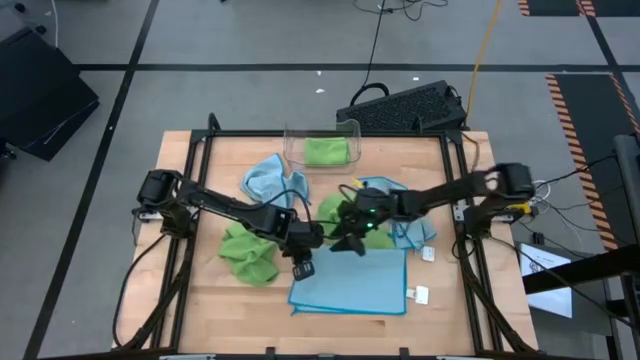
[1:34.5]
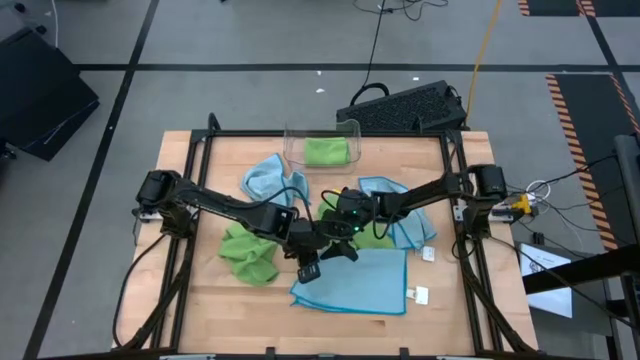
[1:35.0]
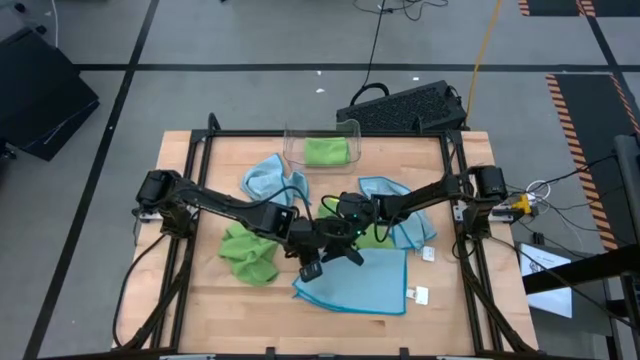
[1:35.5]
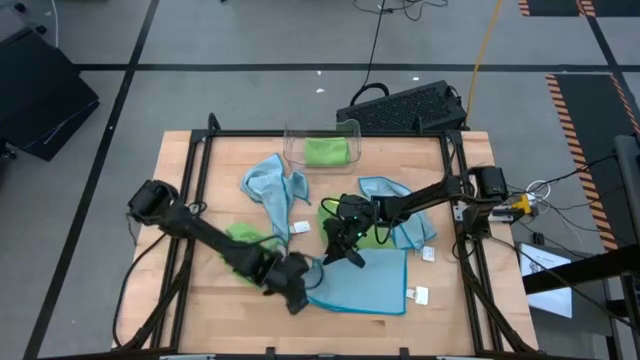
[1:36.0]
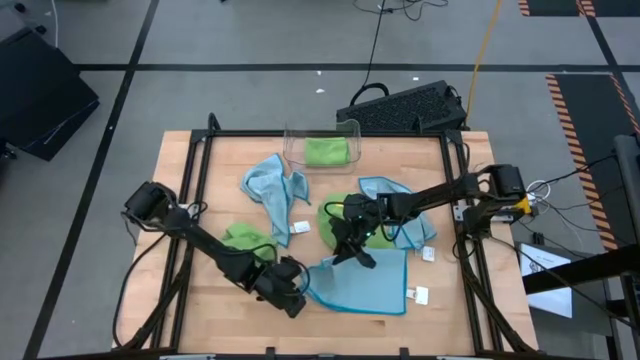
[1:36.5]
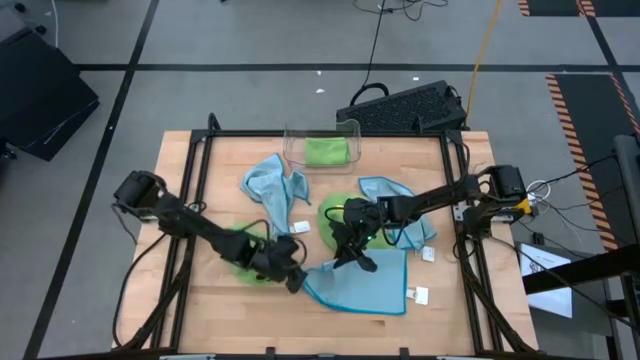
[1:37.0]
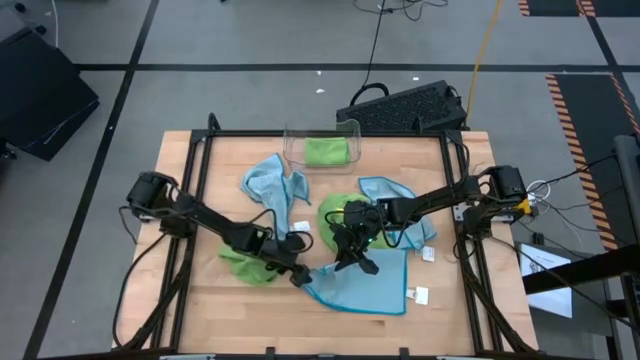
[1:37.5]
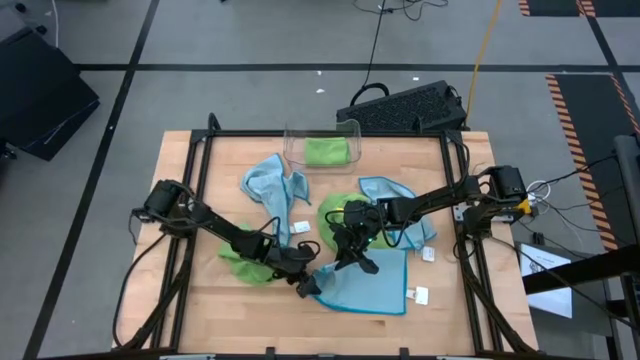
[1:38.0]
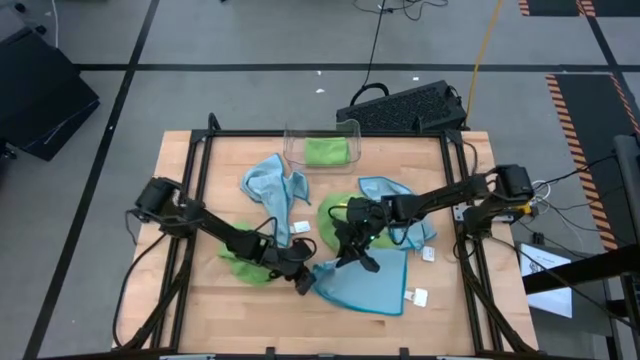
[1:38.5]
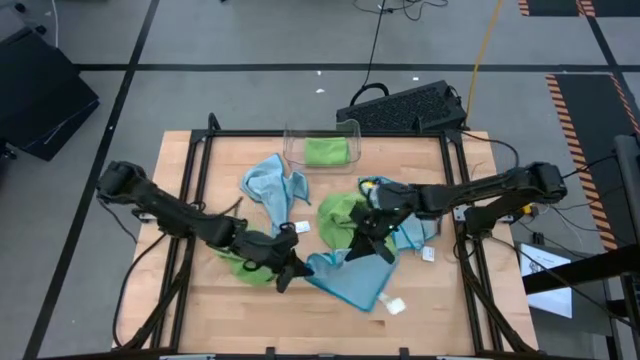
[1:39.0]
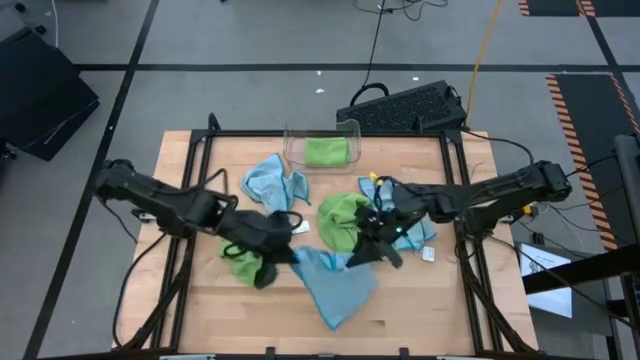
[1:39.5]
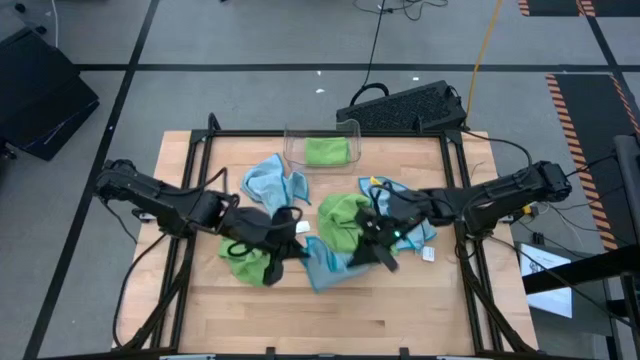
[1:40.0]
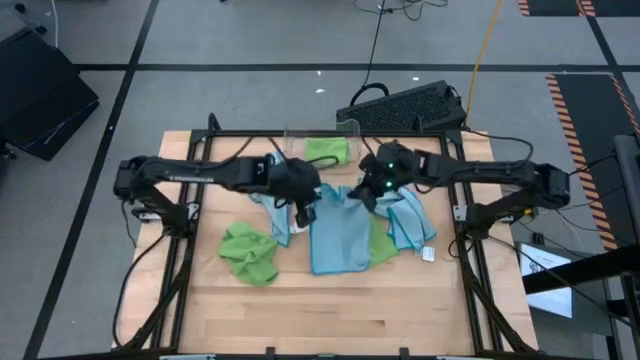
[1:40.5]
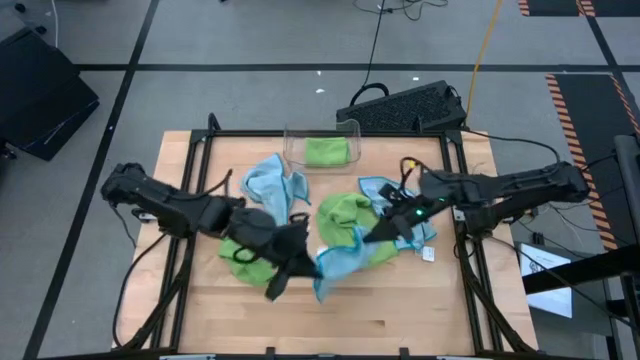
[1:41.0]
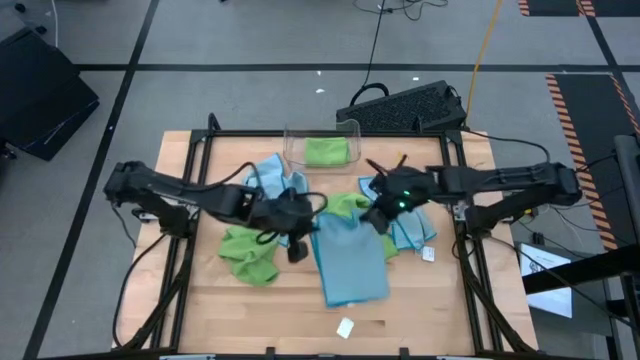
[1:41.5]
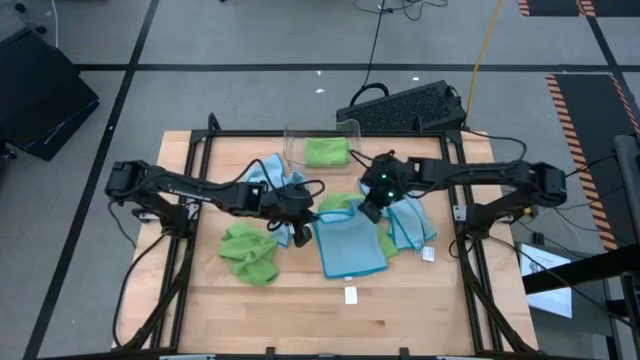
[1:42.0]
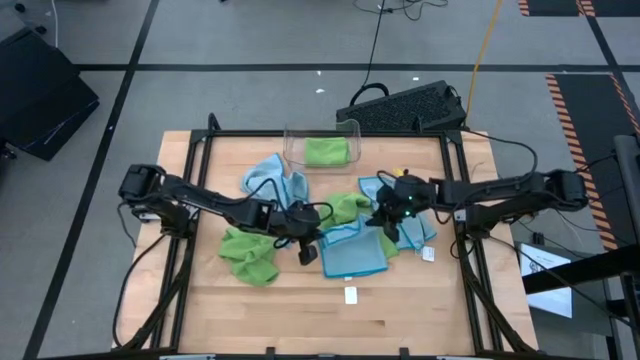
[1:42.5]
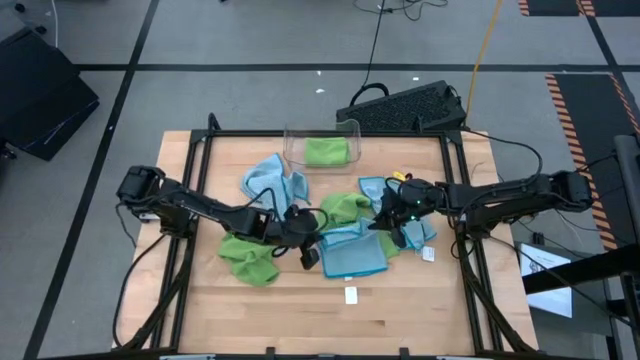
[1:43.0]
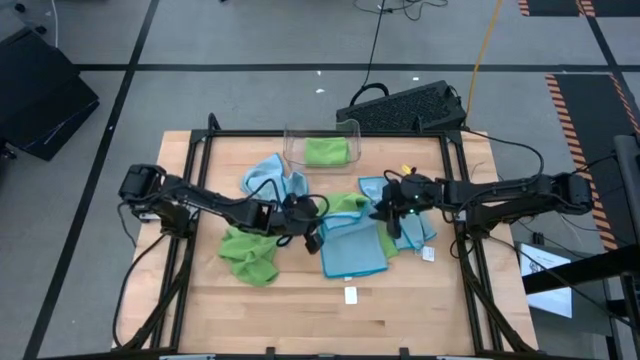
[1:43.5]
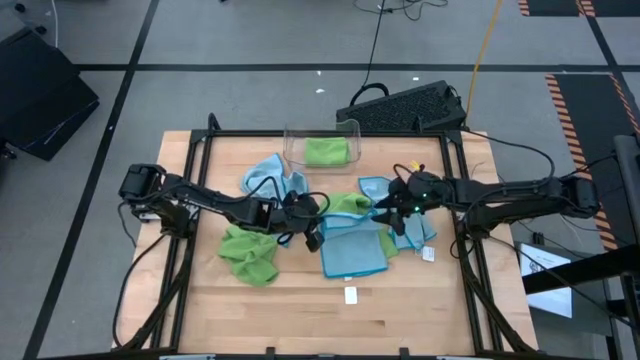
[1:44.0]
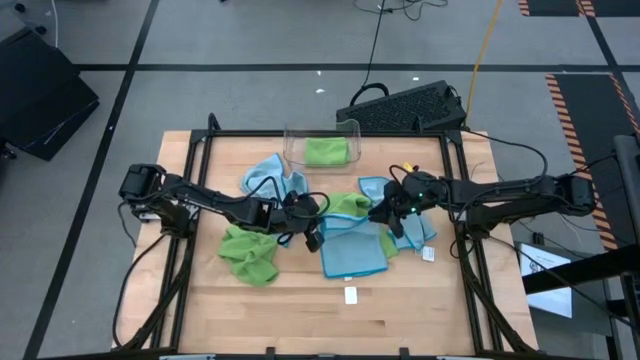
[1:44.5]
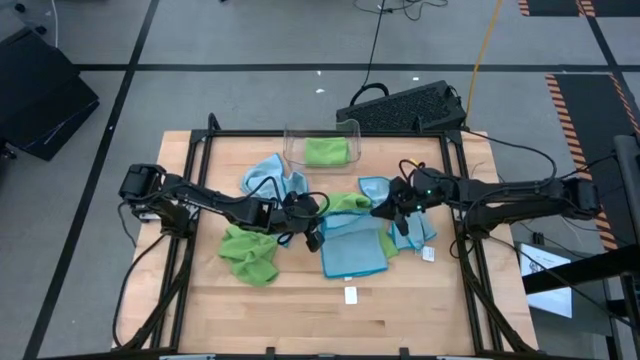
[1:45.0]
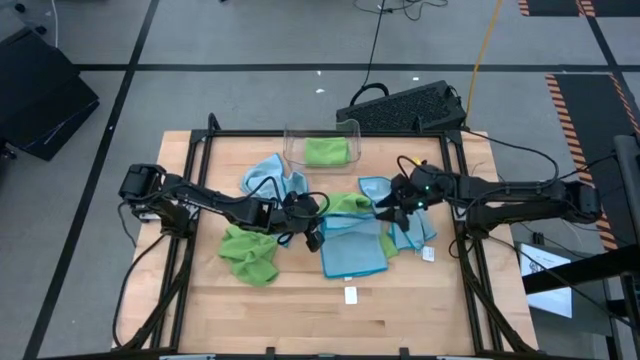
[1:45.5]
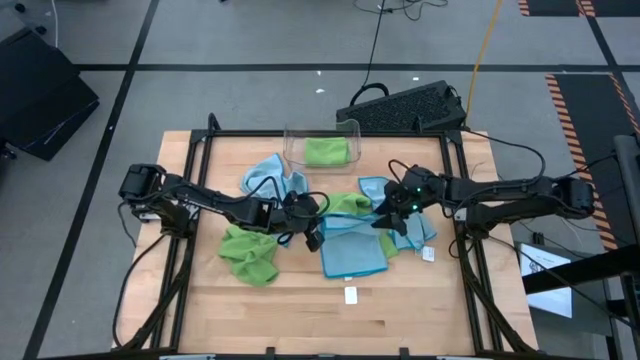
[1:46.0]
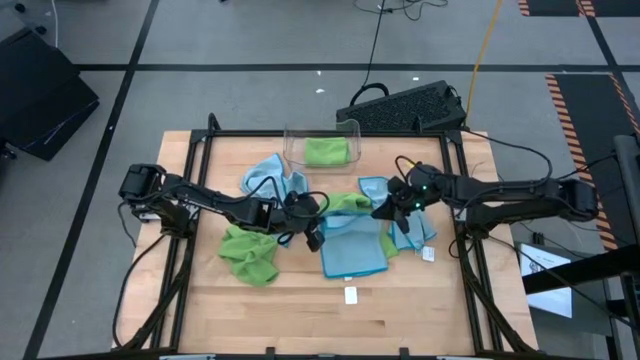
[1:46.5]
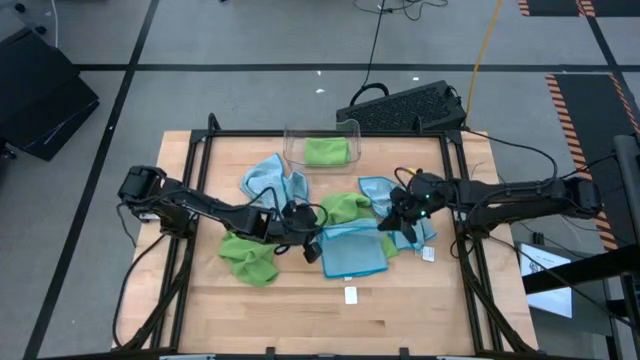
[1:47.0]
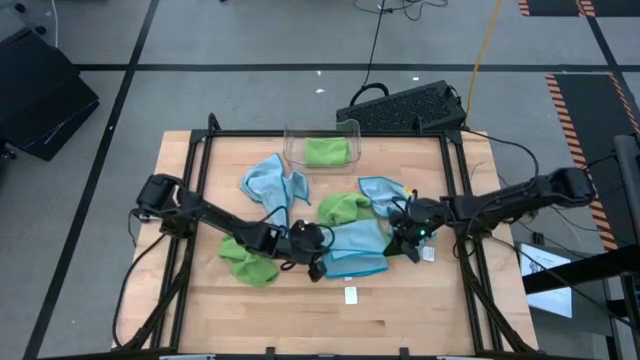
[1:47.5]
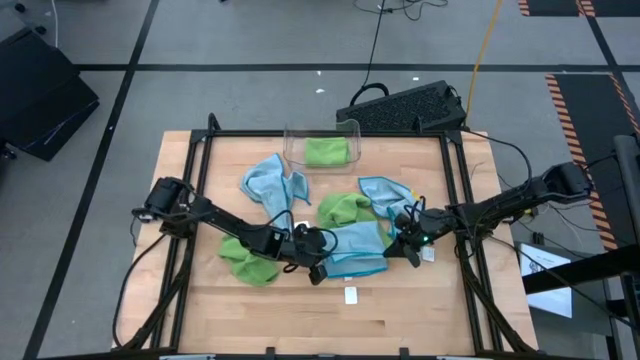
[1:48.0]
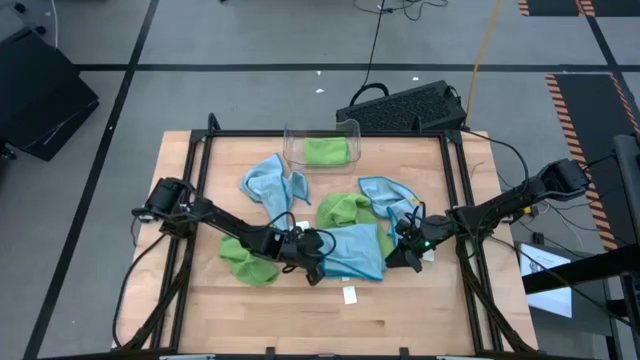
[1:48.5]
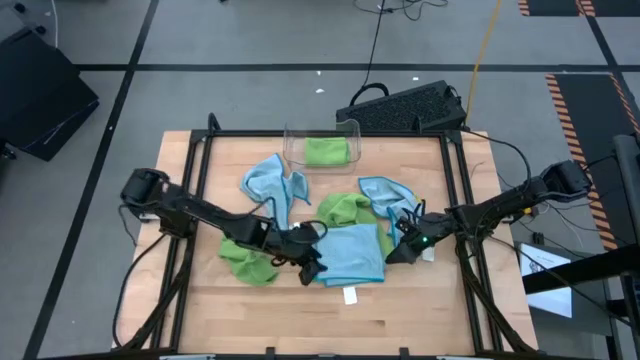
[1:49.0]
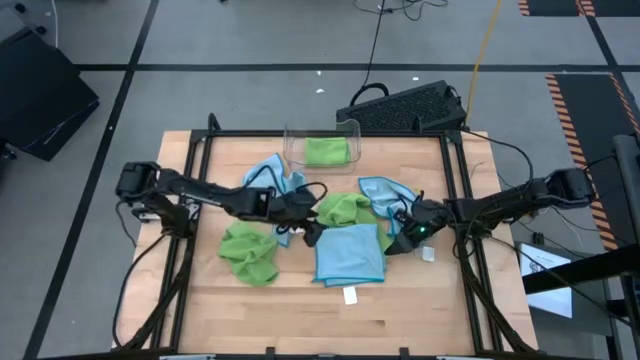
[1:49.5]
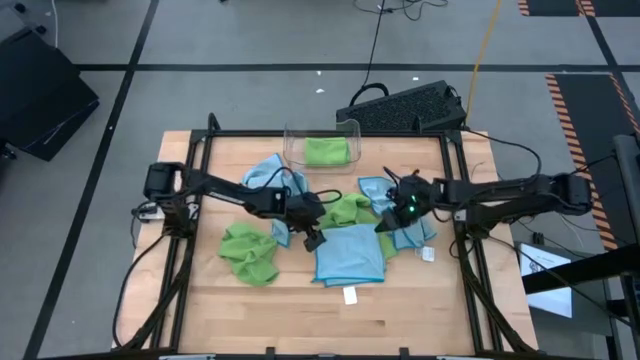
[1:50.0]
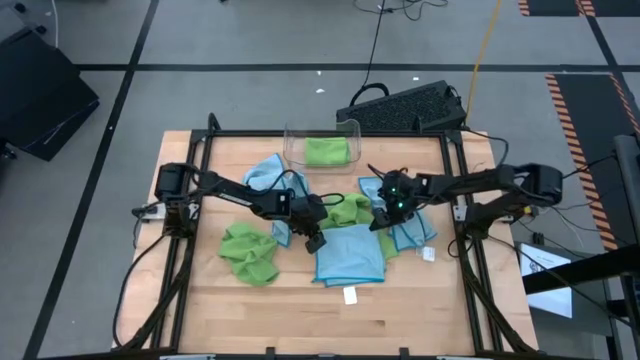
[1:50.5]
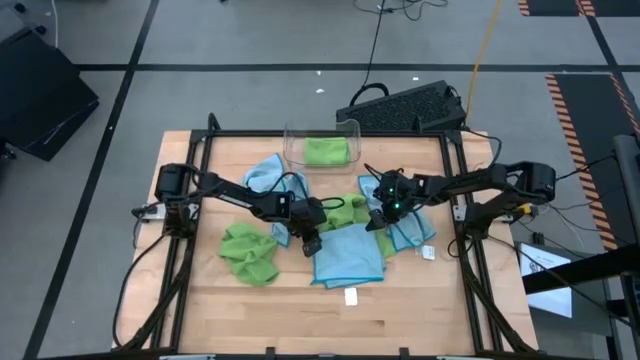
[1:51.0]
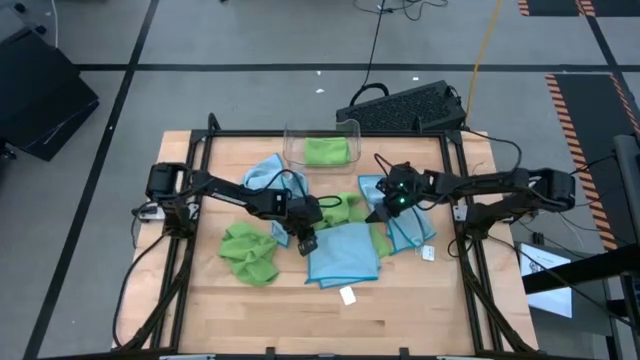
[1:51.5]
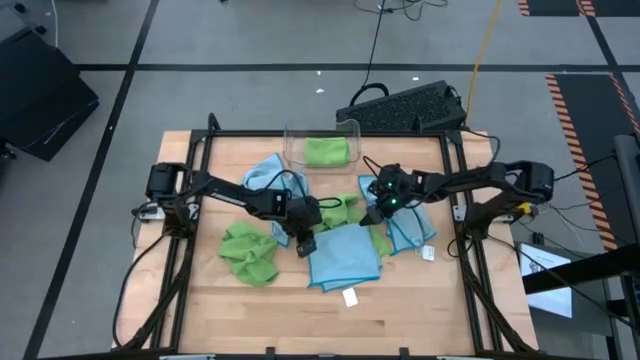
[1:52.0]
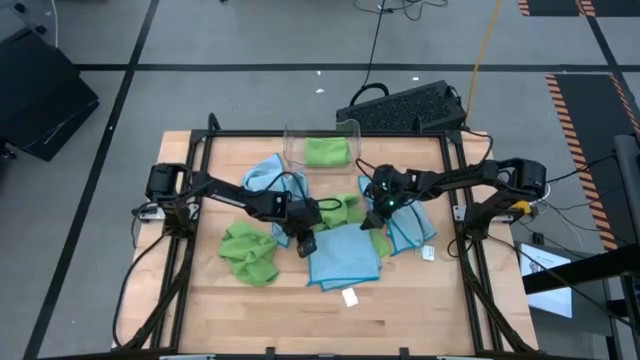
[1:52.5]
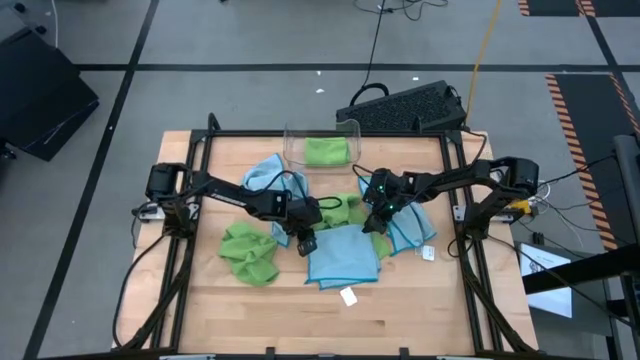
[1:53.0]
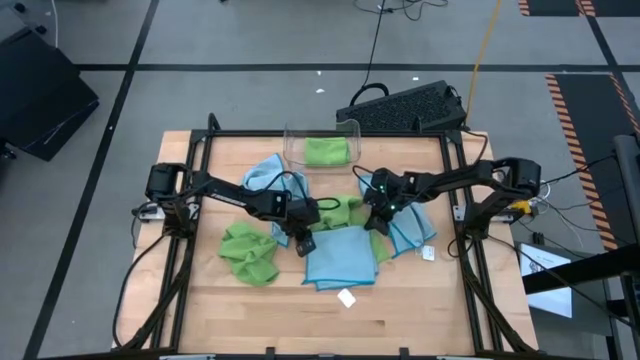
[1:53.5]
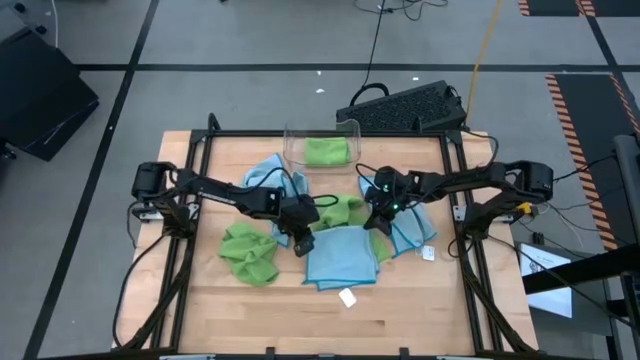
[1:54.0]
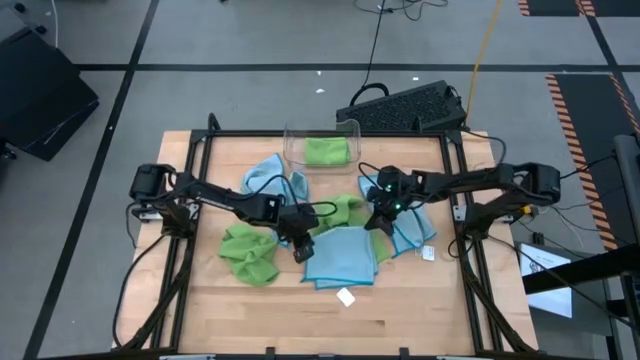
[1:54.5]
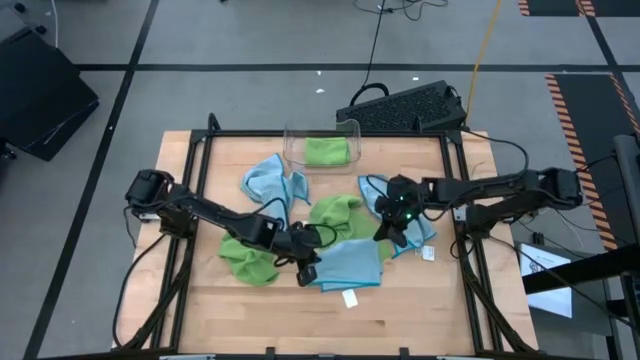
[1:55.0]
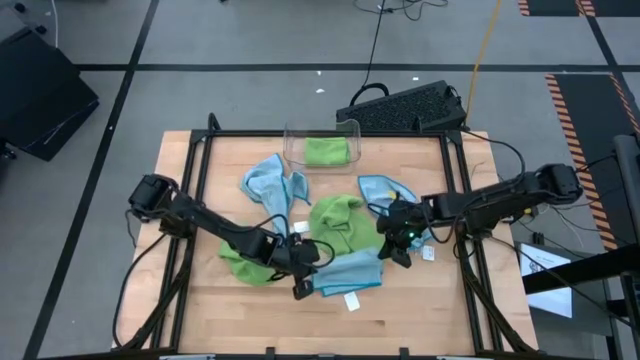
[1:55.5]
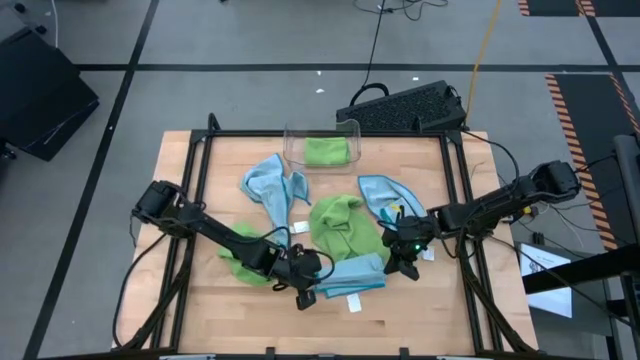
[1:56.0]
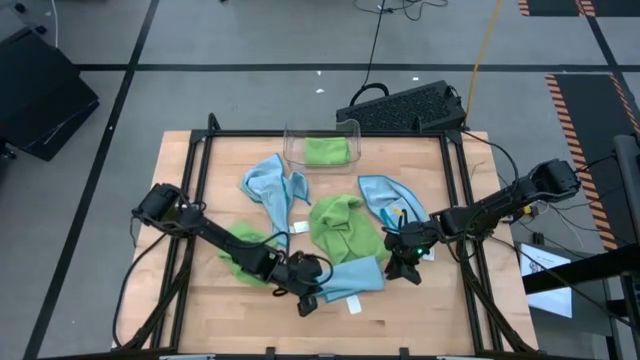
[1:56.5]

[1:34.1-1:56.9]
Task: Fold microfiber towels
Fold the bottom blue microfiber cloth
